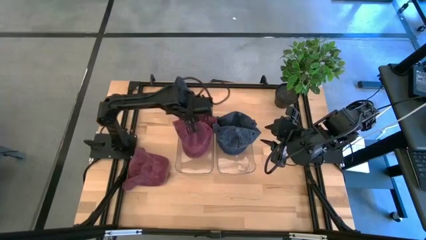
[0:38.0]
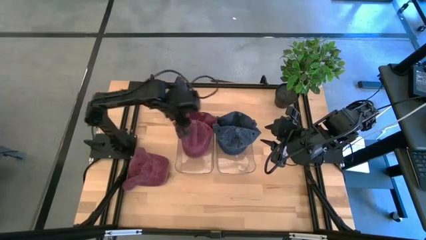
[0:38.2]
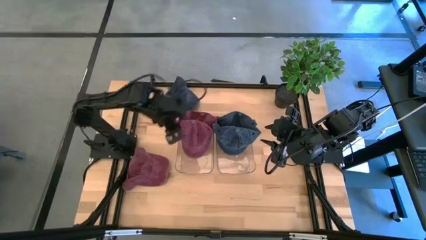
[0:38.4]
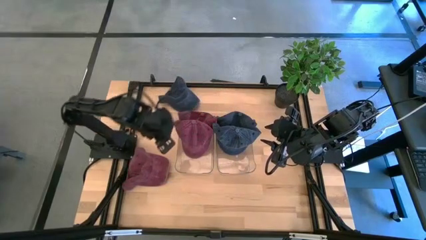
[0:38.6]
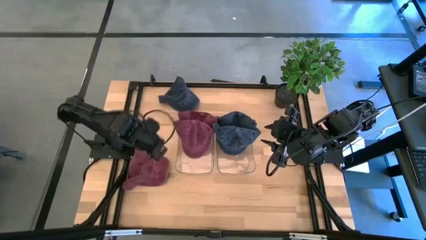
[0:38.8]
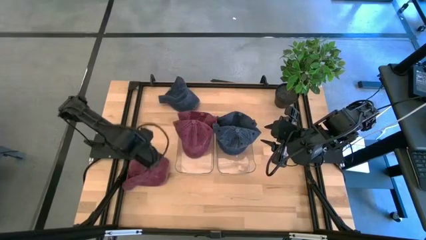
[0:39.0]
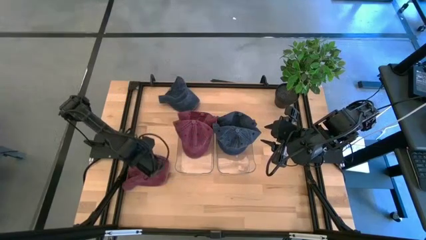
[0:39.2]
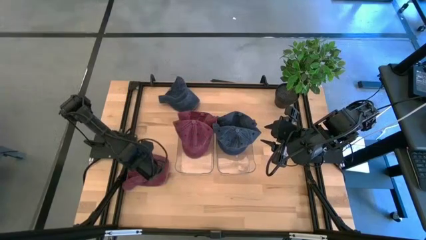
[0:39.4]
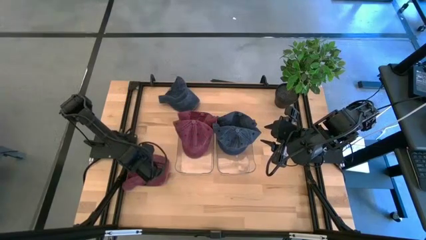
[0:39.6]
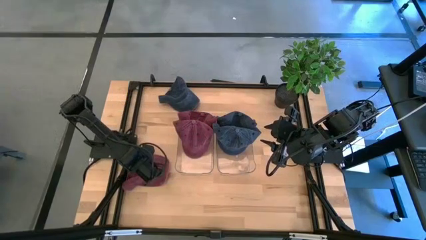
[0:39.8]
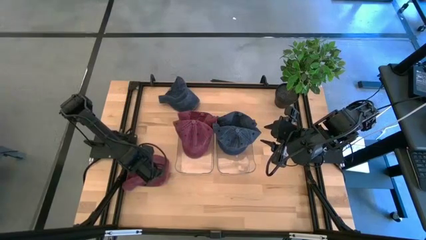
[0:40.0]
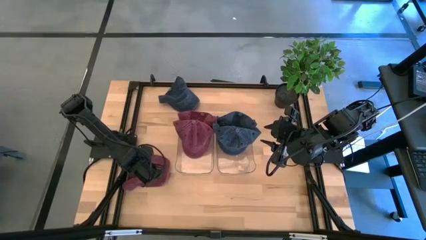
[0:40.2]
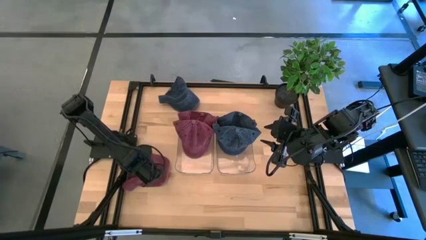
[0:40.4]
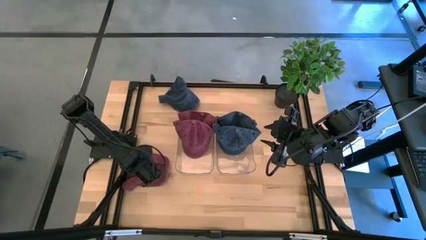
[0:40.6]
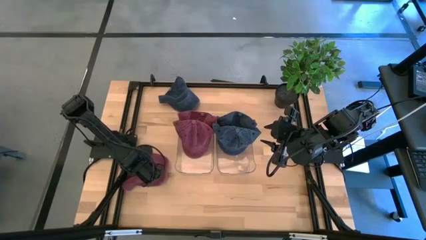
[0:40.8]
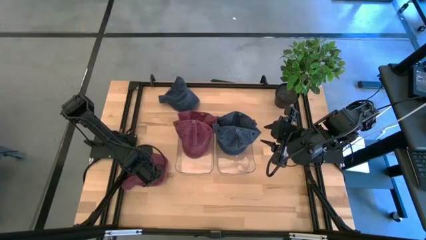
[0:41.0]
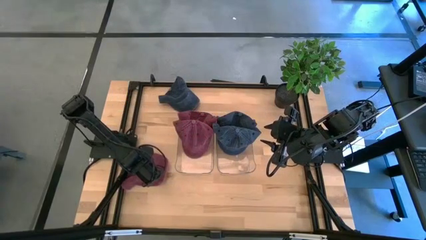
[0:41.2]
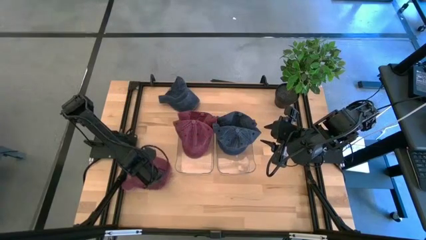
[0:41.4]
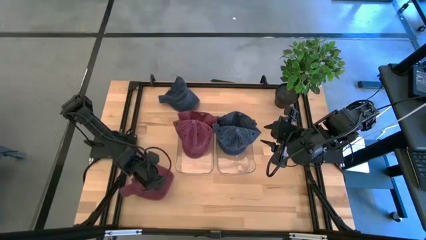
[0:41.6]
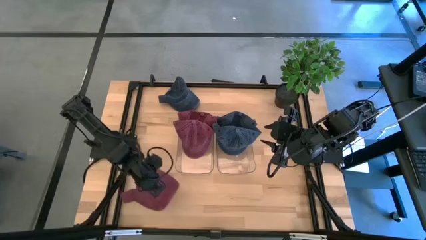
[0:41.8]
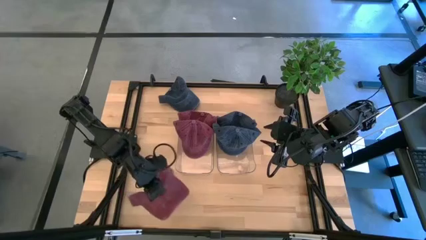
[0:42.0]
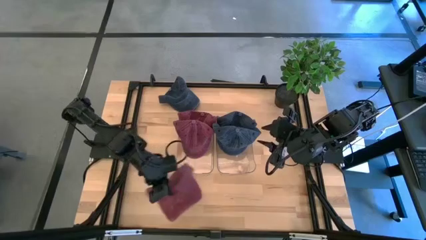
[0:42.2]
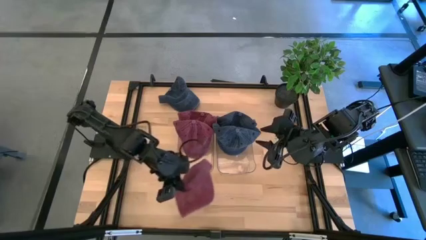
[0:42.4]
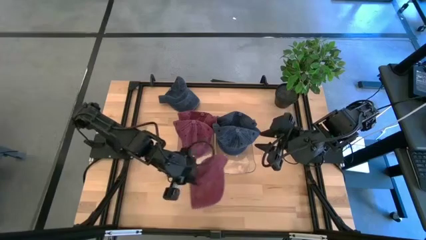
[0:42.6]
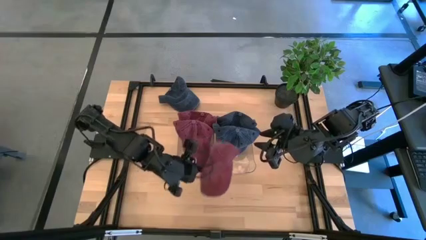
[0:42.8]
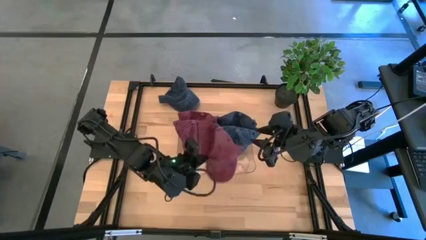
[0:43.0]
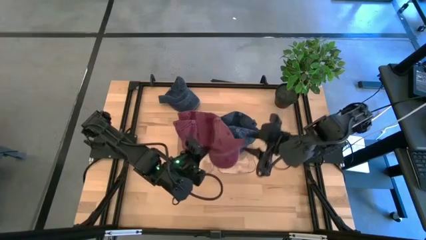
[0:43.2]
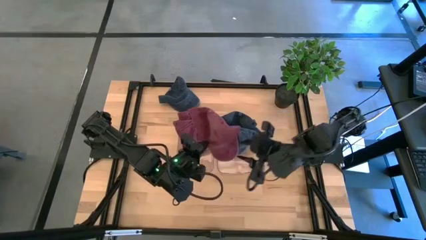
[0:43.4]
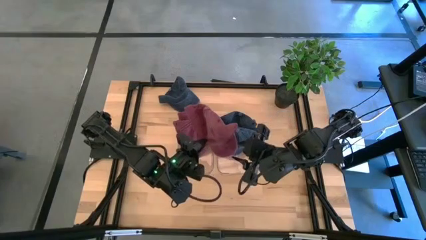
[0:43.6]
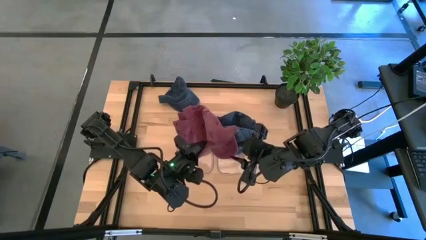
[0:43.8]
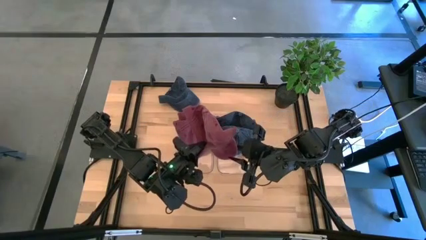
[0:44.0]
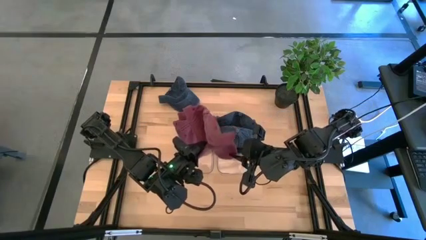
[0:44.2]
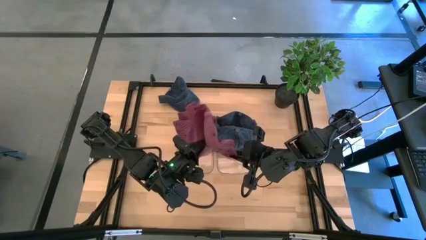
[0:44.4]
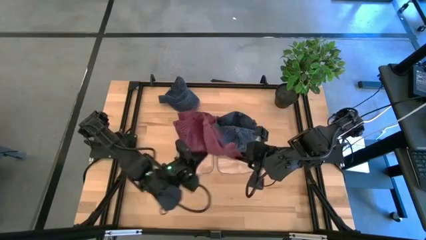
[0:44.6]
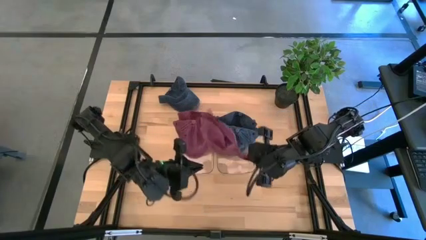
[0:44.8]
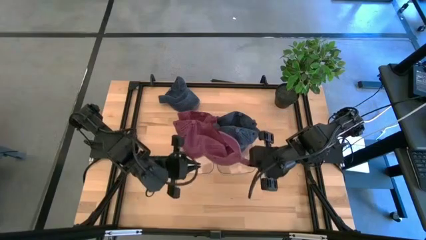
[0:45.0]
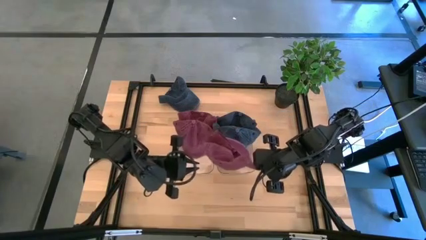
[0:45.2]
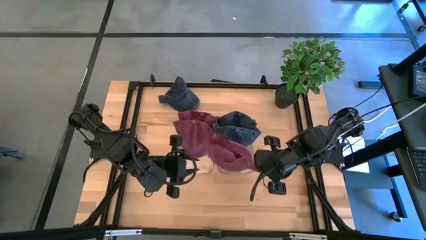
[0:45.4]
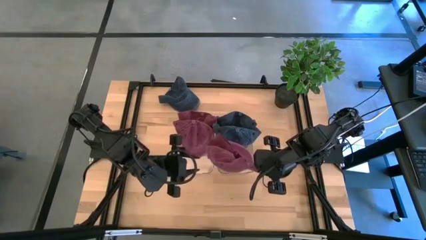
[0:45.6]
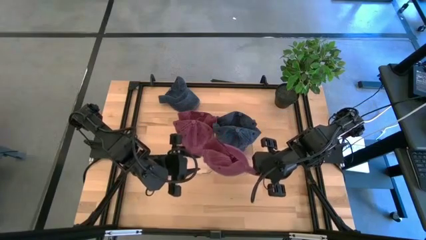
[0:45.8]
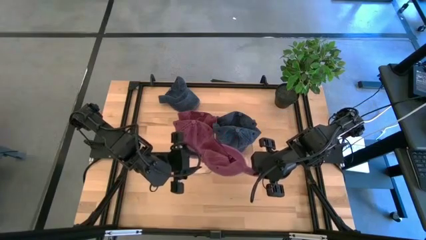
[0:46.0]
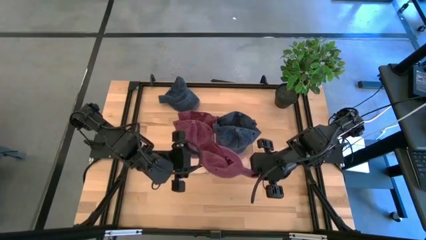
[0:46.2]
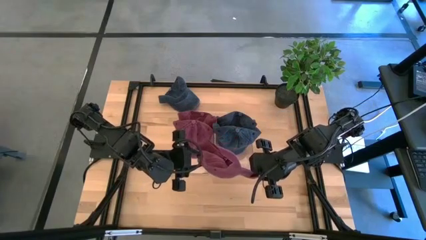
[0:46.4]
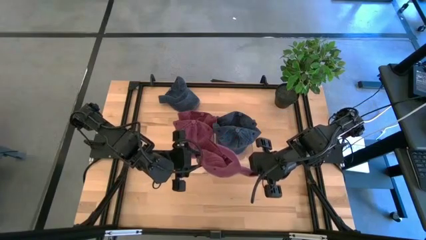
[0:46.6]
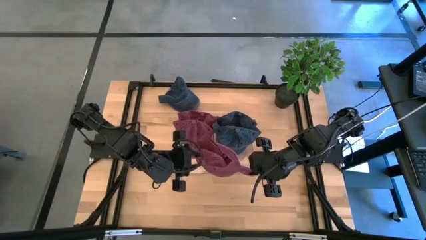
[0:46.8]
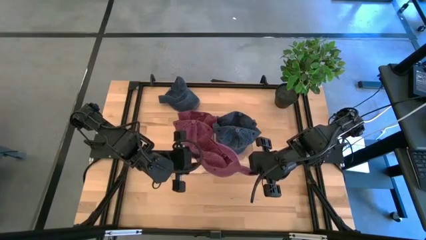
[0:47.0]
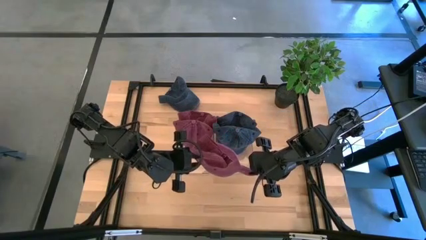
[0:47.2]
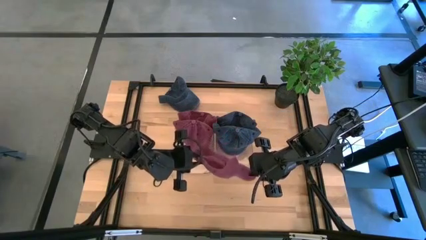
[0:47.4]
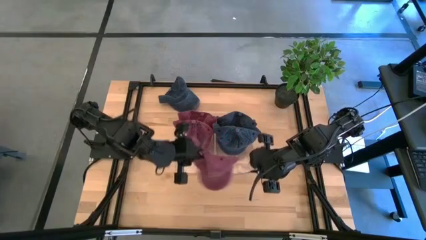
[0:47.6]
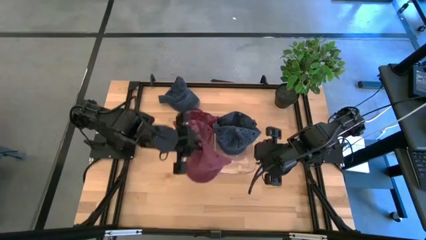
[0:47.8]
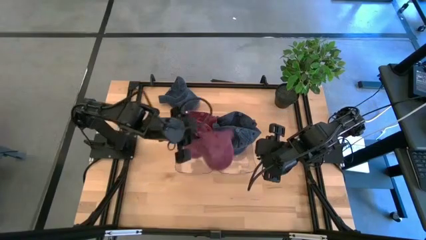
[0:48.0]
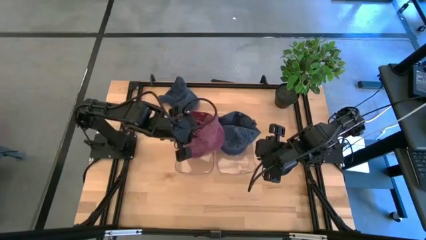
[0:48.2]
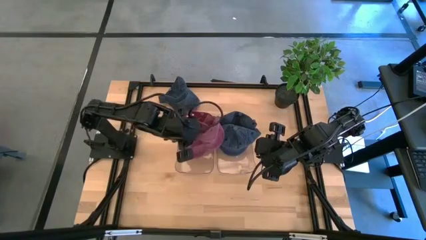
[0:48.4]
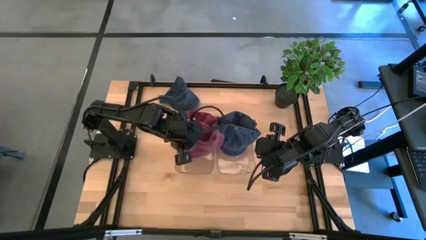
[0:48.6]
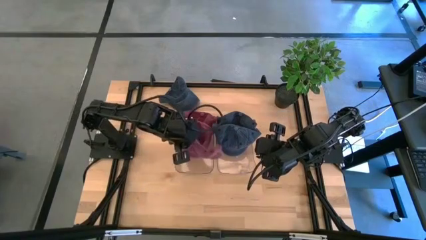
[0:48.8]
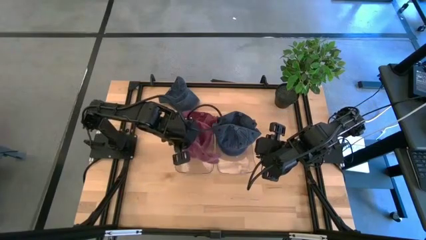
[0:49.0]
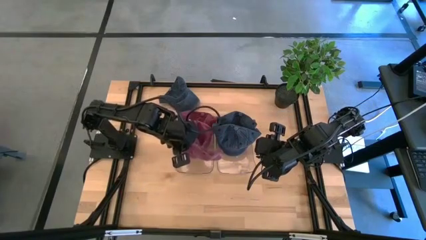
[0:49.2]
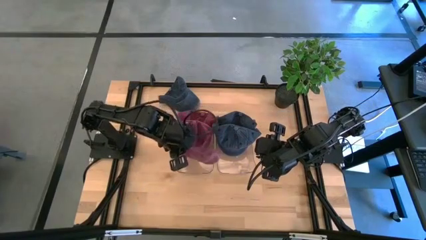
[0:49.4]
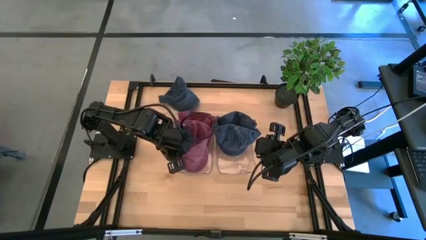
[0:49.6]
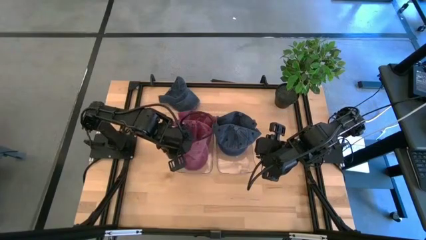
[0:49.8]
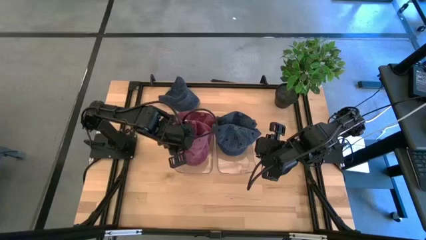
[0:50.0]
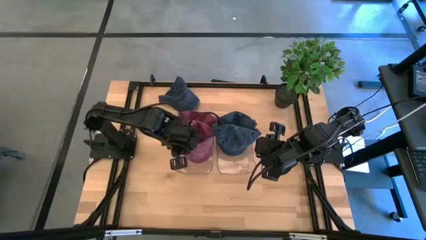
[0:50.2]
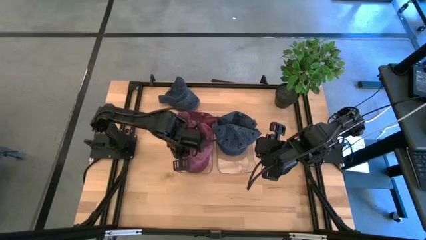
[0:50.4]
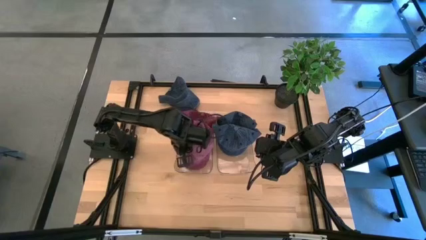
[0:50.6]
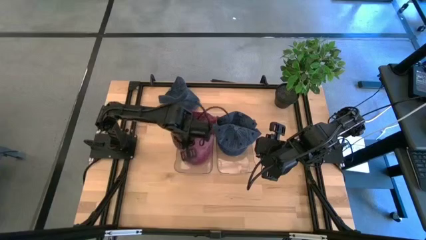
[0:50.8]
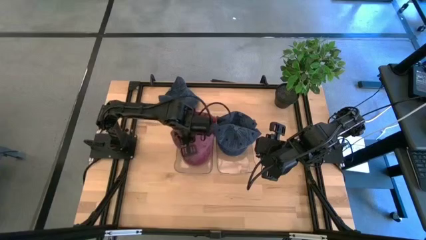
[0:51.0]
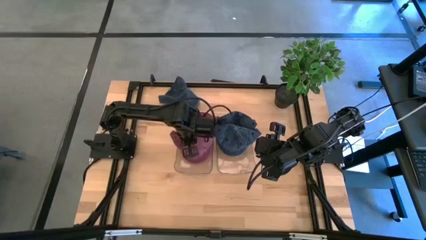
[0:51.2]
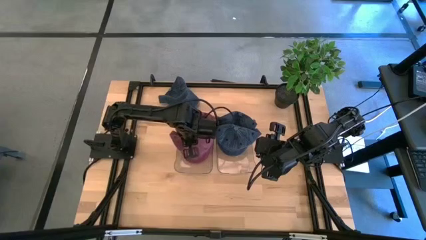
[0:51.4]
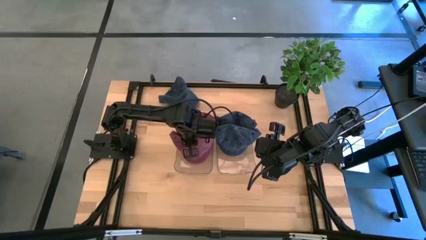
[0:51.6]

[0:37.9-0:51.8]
Task: Pick & Place hat
Put the red cap into the left transparent bin

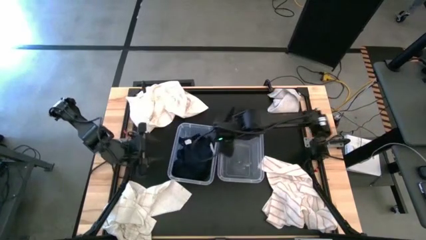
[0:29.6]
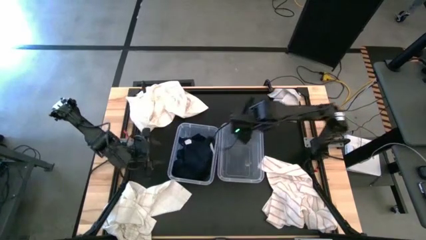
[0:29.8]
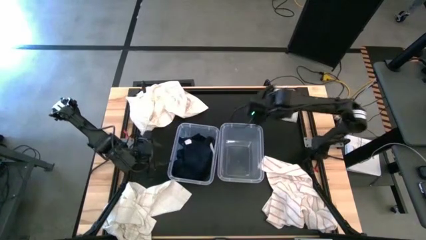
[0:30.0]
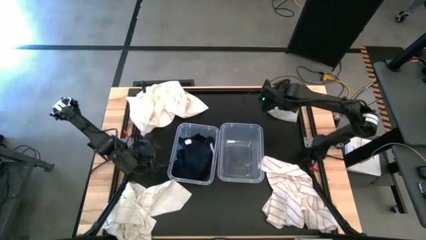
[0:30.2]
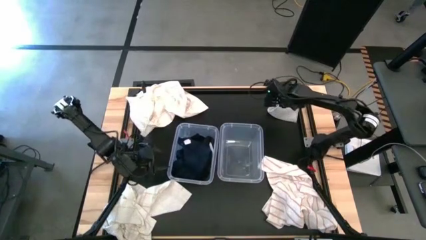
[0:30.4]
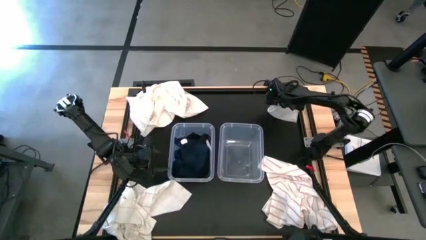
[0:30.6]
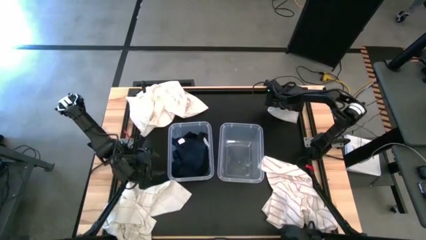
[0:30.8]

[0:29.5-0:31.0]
Task: Sort towels by color in basket
Adjust the left transparent bin on the table

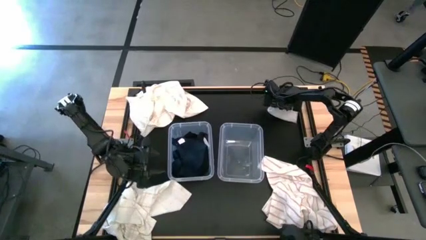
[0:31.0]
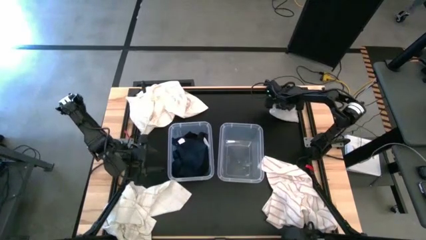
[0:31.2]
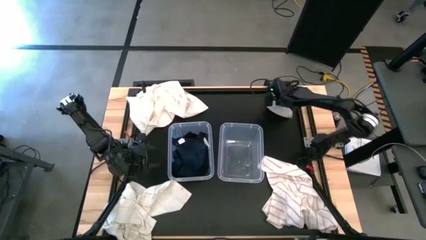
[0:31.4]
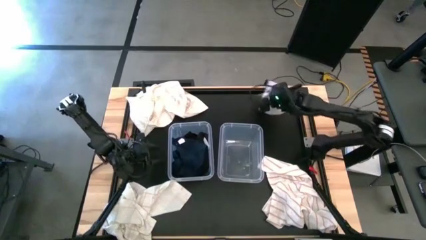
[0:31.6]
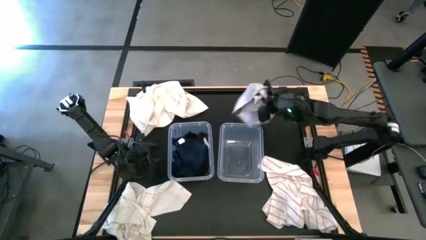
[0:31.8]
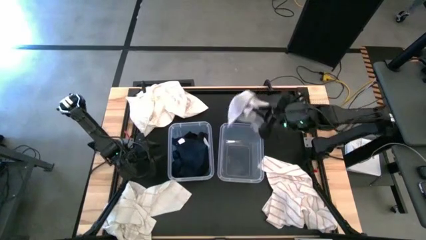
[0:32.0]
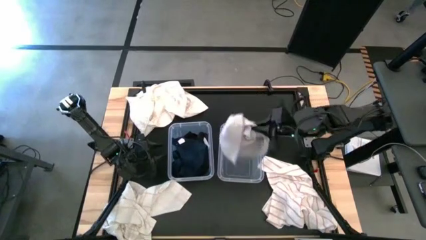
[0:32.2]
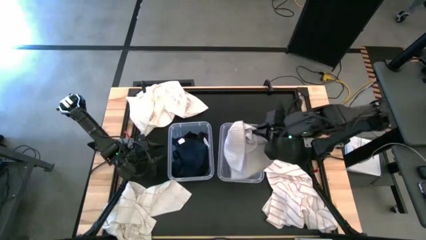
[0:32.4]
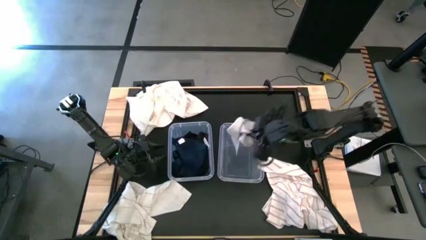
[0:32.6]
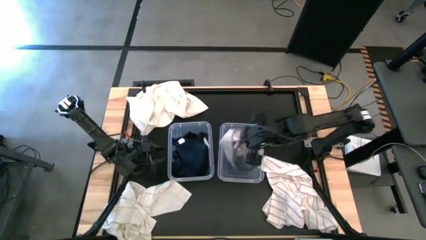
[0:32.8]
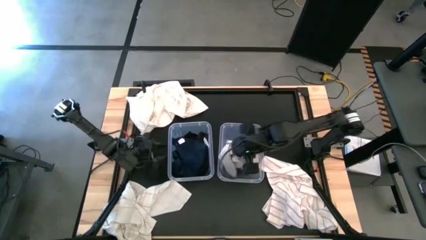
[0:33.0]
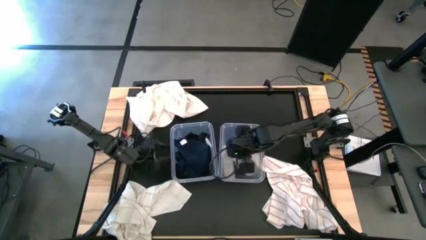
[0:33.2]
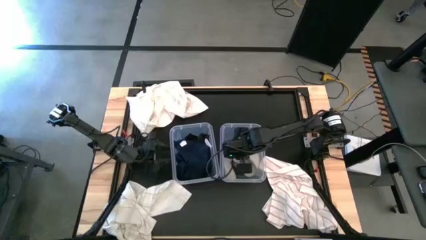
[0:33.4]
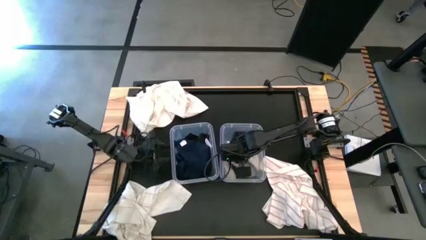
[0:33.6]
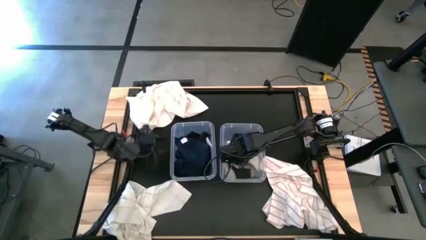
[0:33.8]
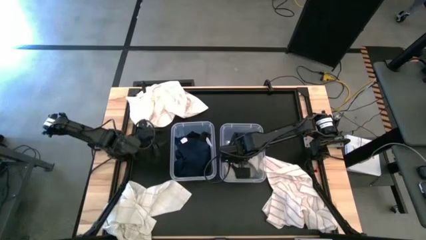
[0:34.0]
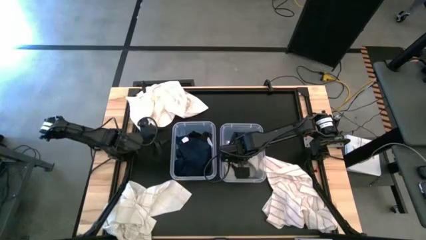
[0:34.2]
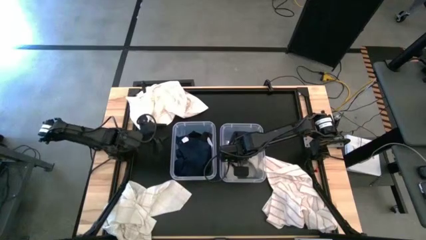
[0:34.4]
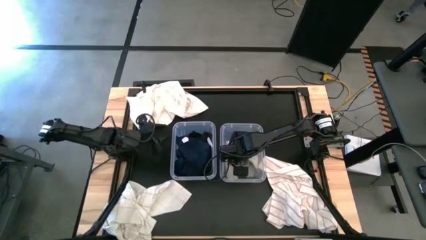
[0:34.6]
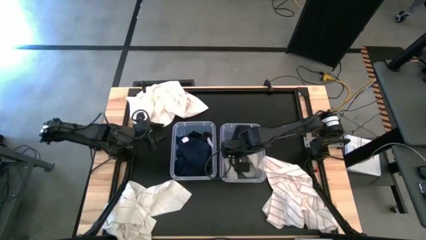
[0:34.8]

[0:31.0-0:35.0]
Put the gray towel into the right transparent bin
